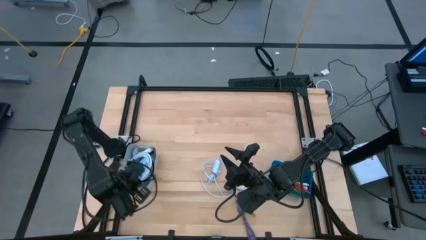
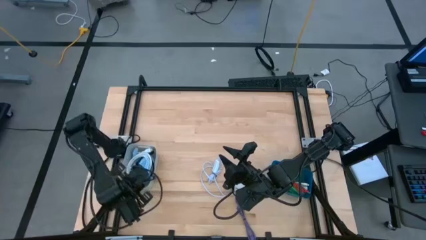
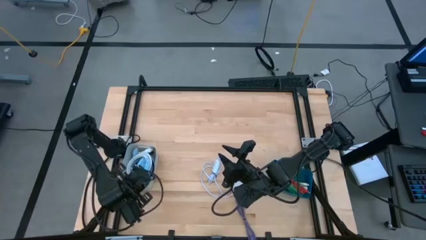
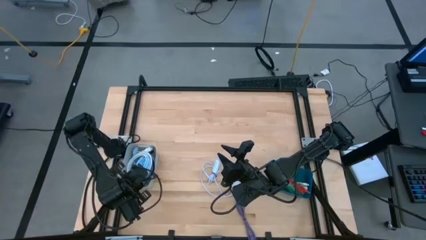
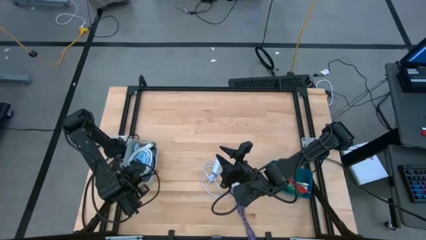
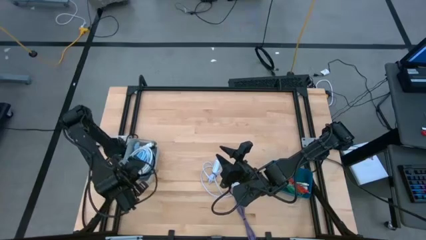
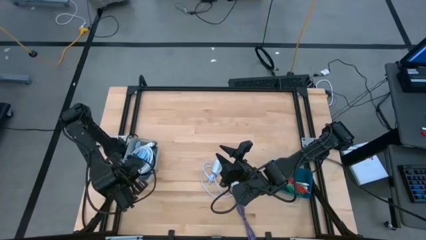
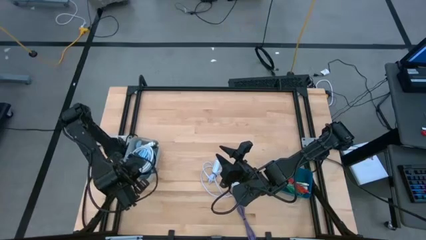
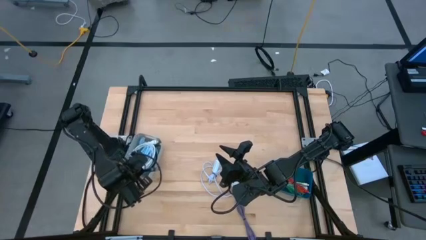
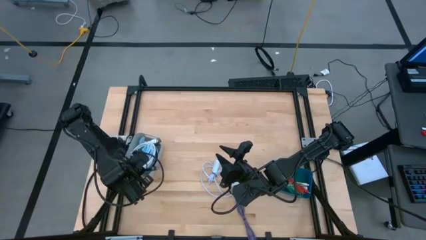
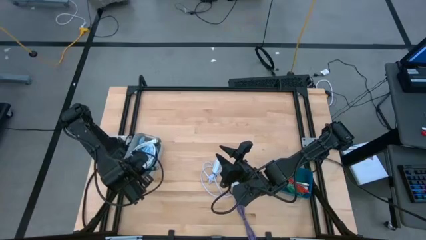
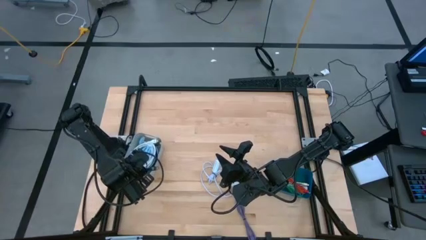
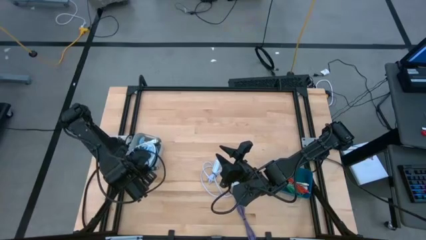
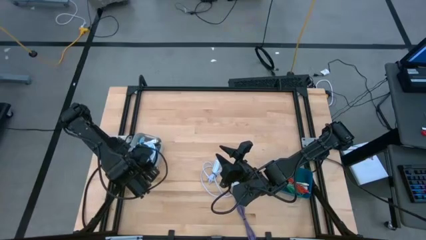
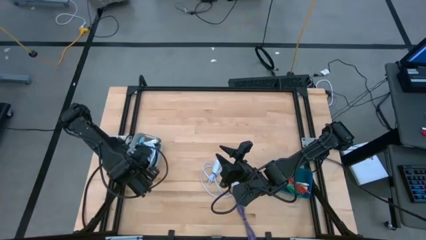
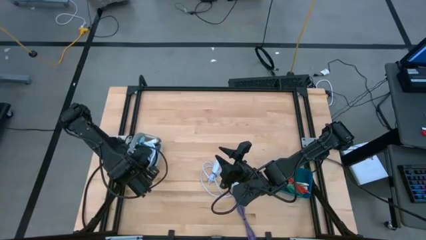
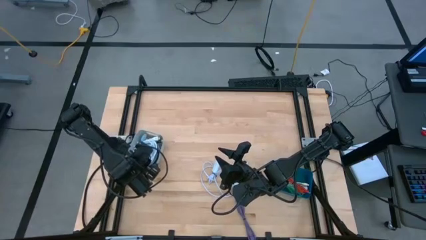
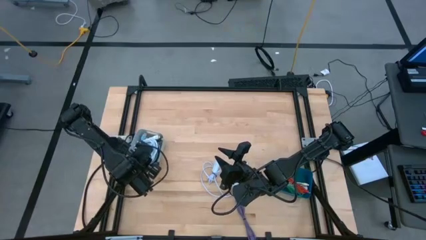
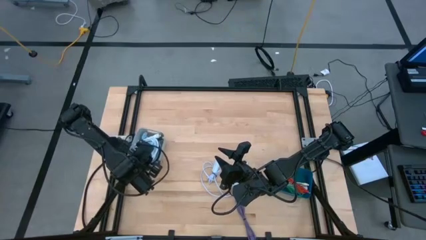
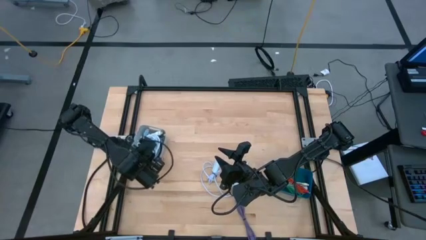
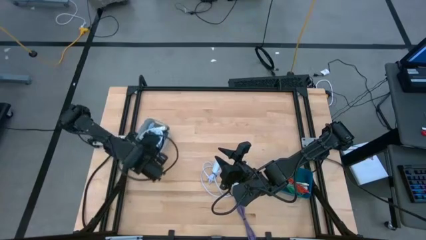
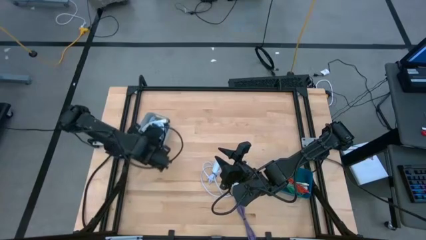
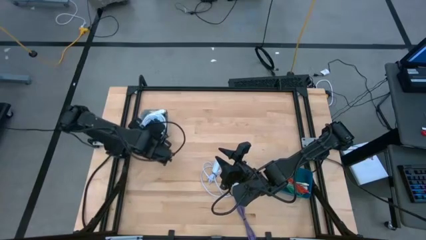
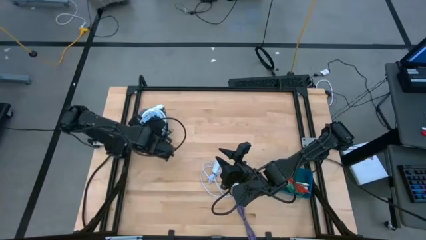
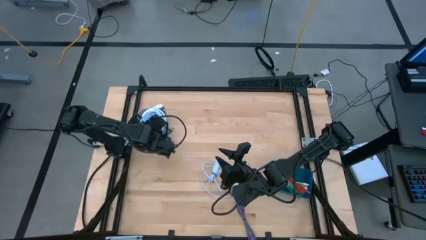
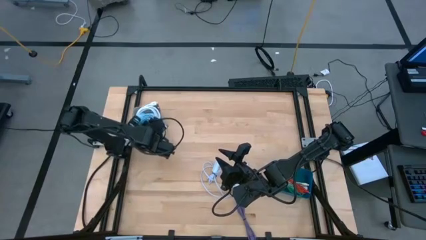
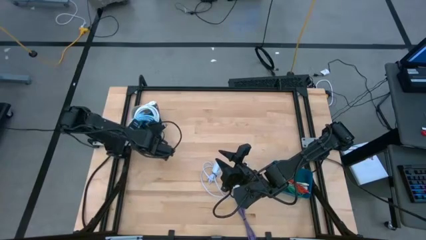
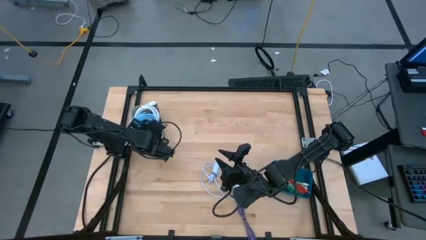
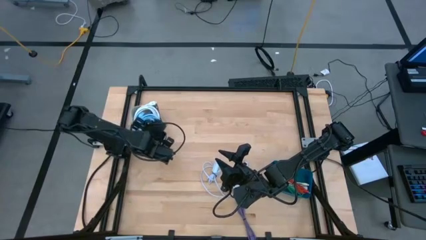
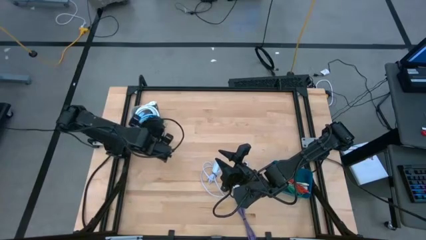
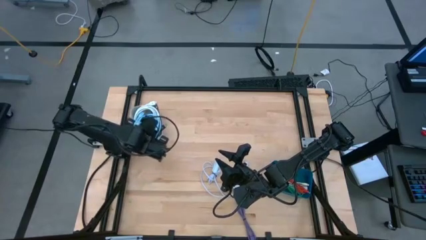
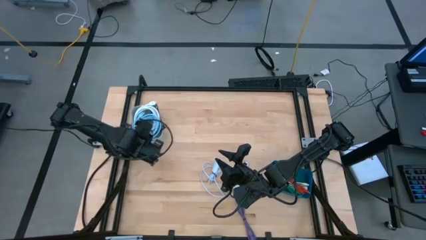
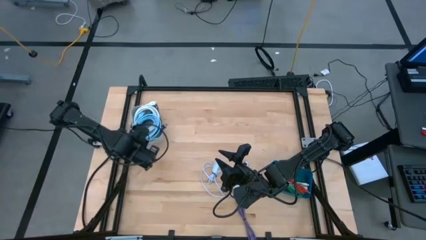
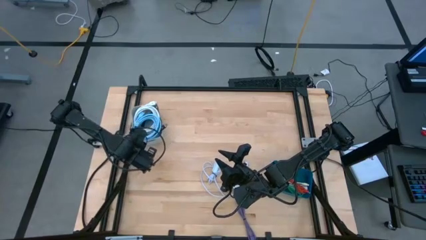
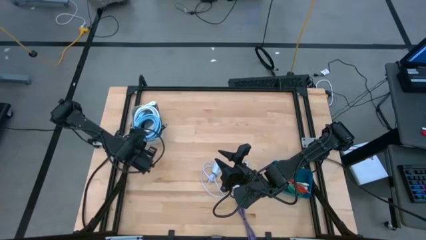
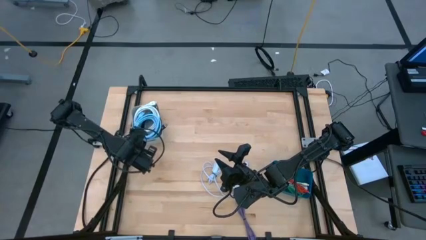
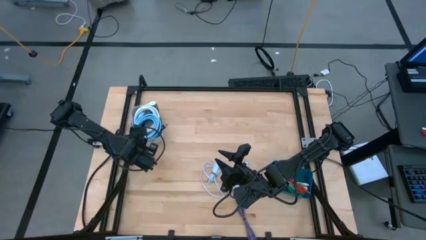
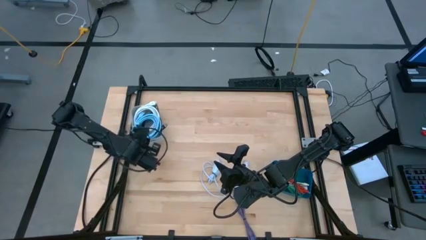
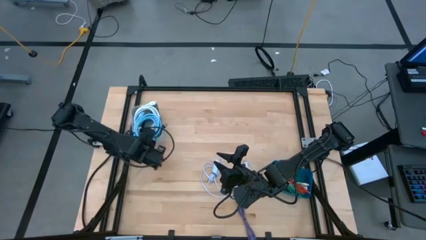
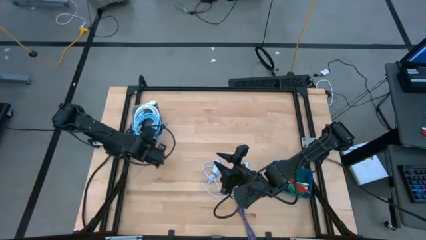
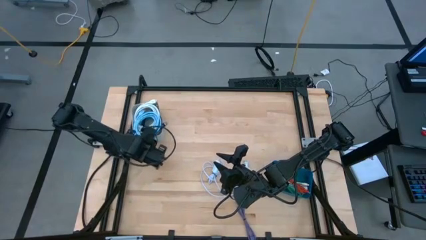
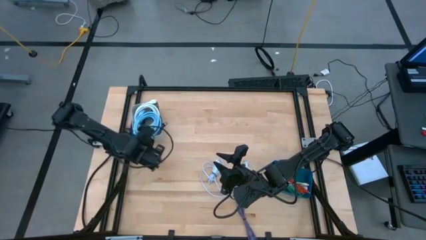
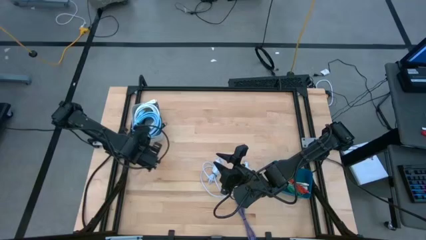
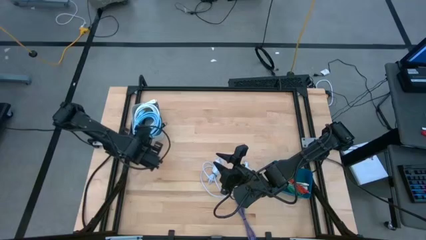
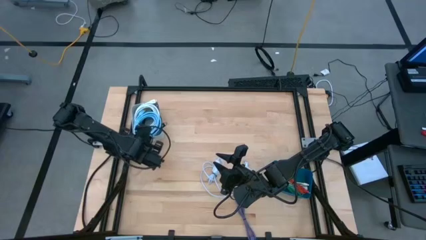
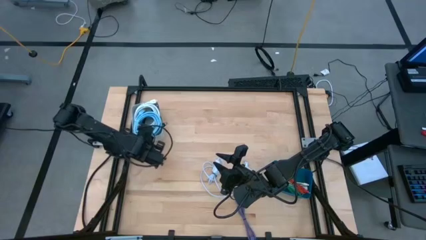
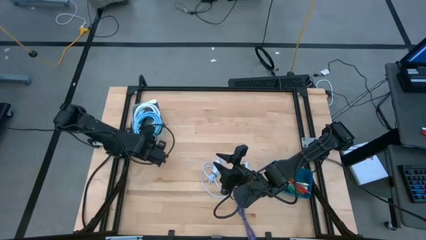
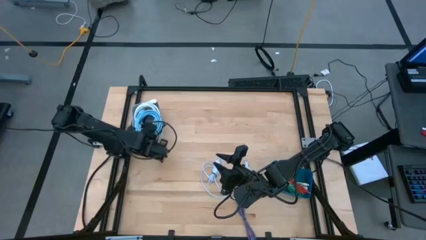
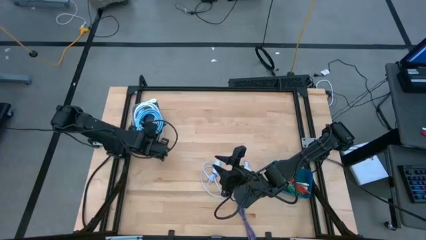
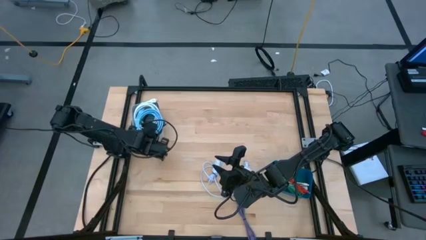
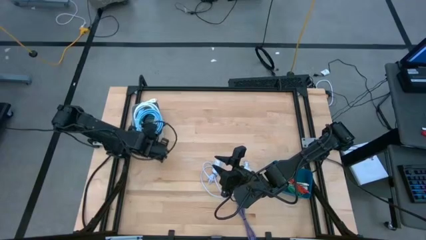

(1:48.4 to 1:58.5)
Task: Pick & Place USB Port
Put the light blue HDMI cable into the gray bin

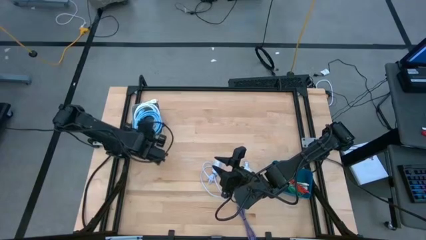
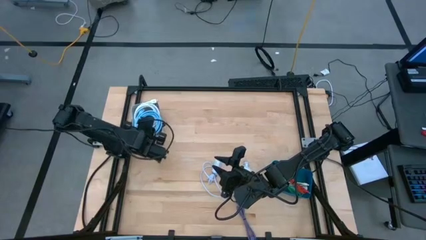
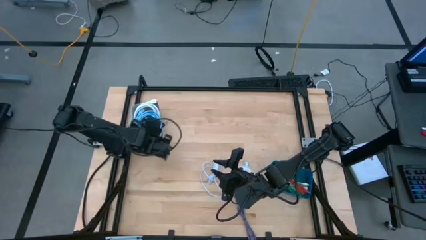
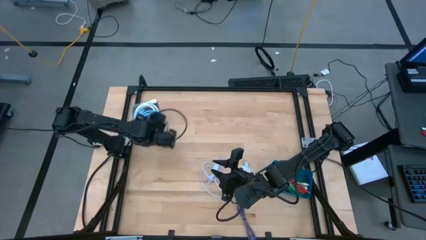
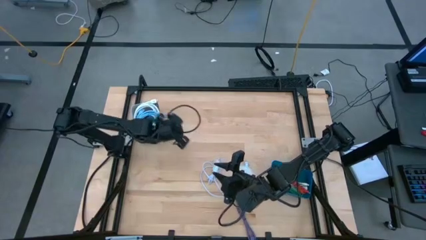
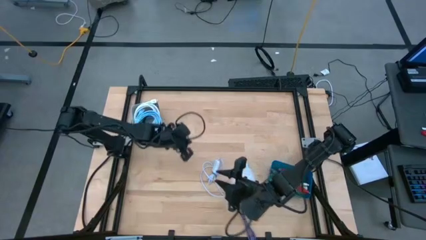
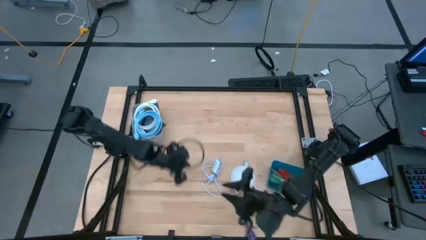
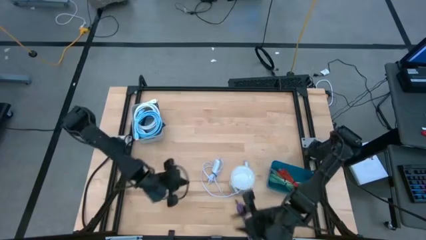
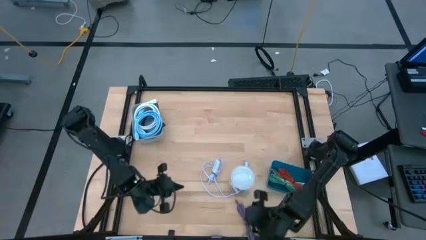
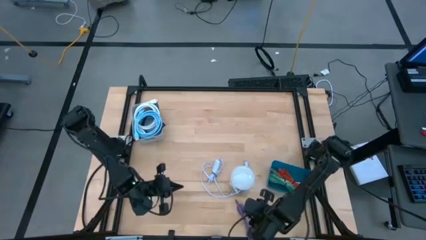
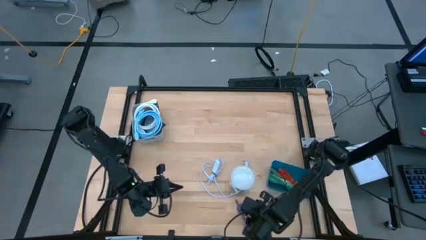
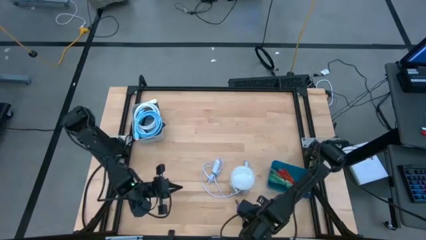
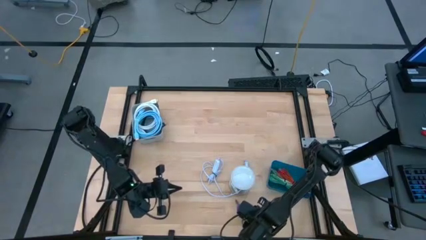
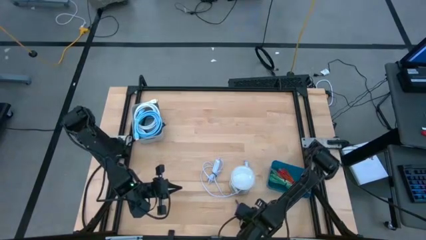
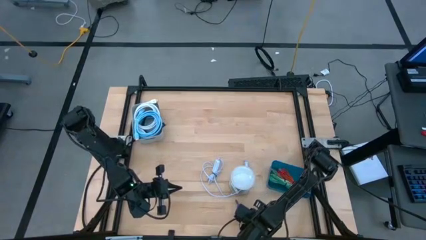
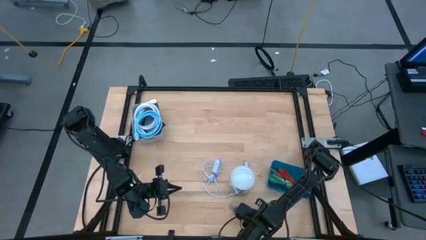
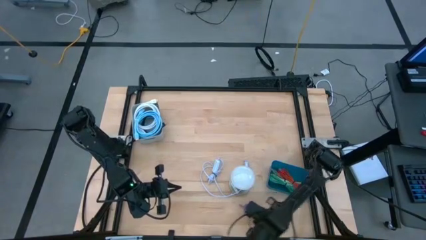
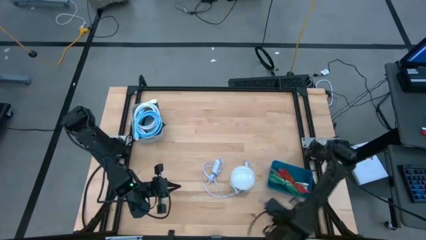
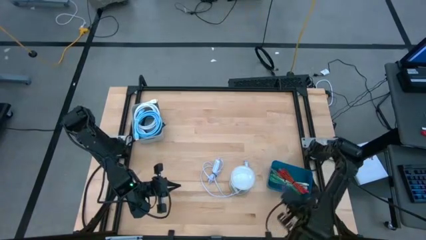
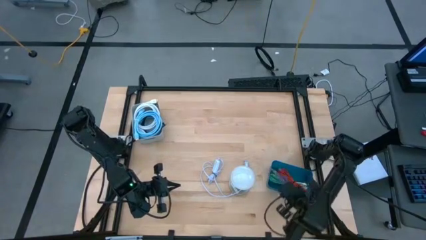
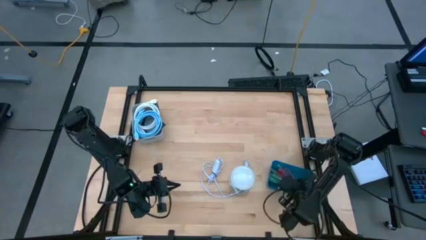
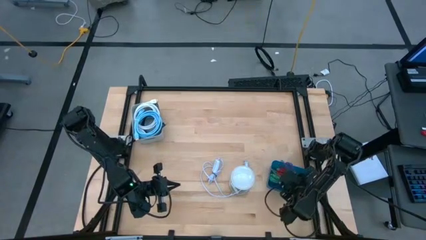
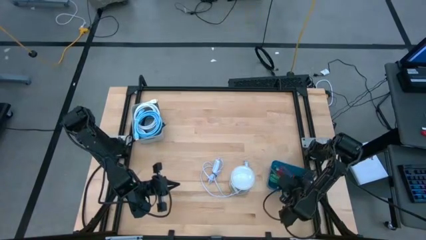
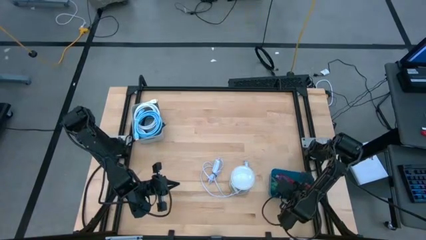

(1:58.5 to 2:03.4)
Put the purple USB cable into the blue bin
